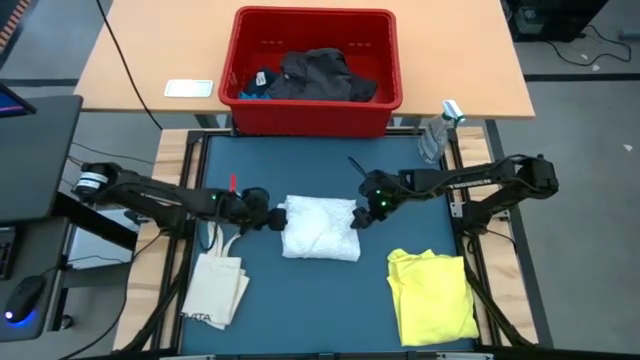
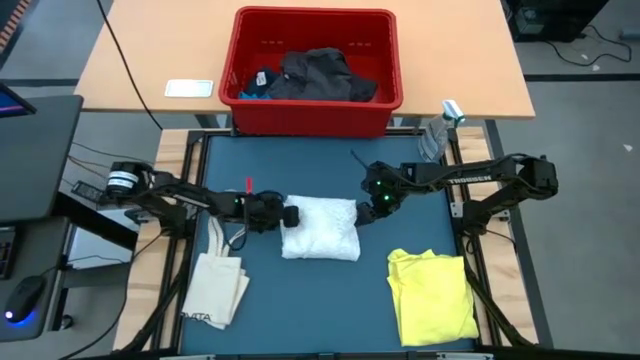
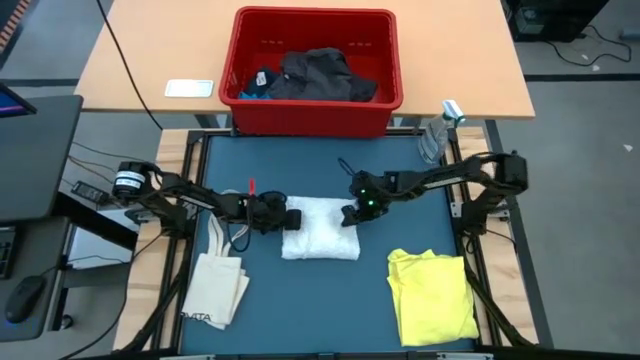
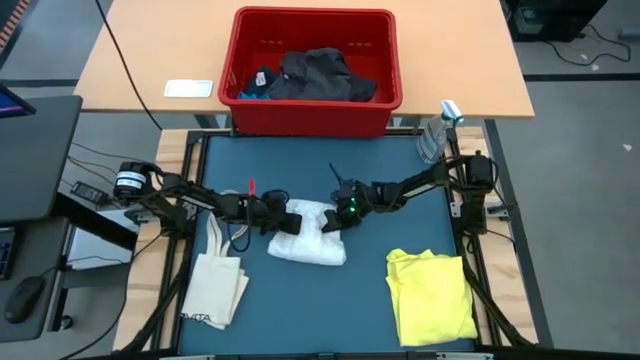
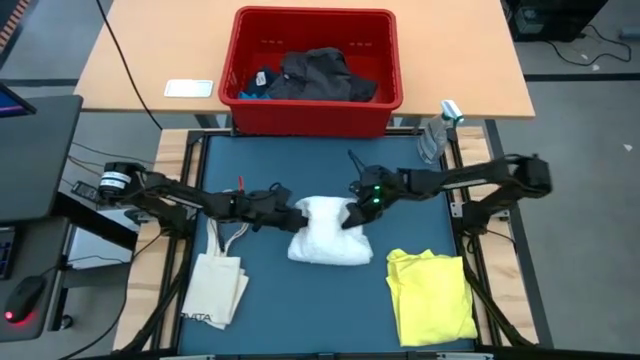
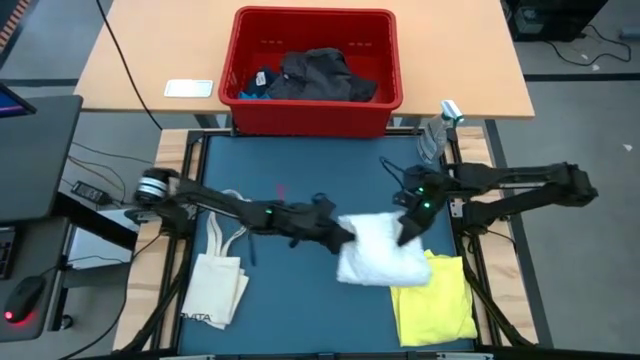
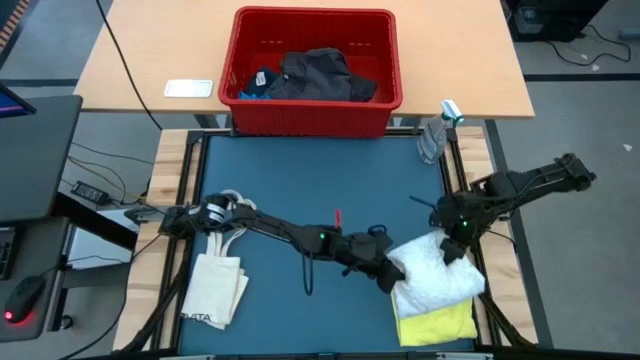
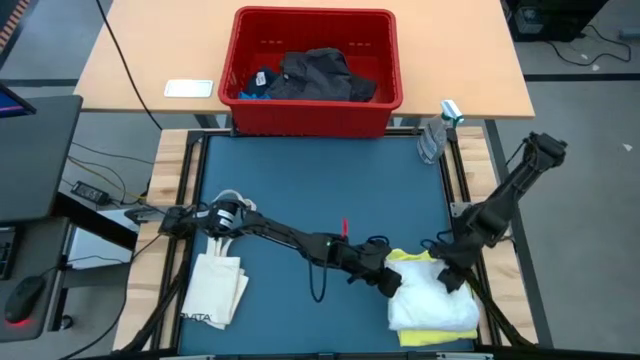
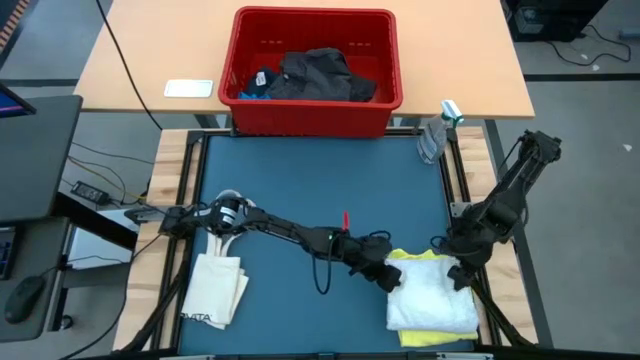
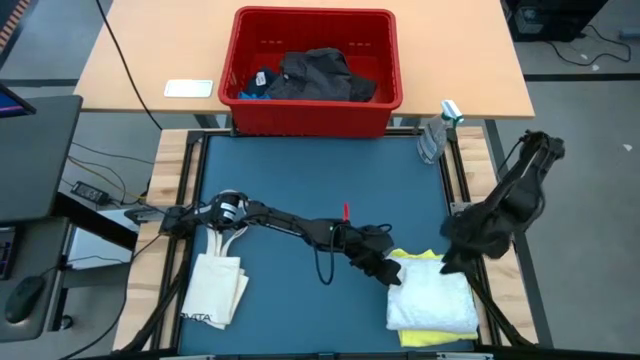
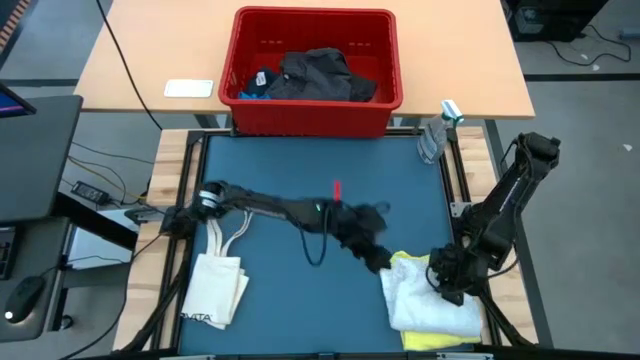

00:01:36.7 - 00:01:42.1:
Task: Fold laundry
Stack the white cloth on top of the yellow shirt

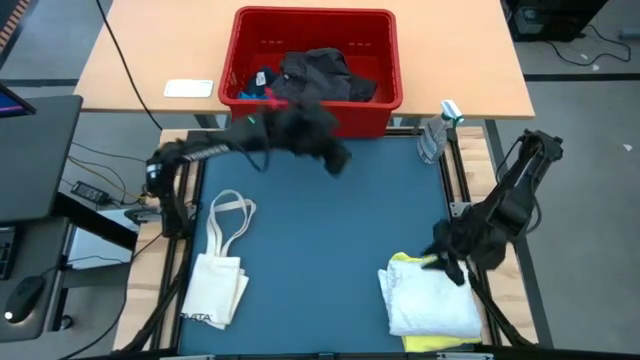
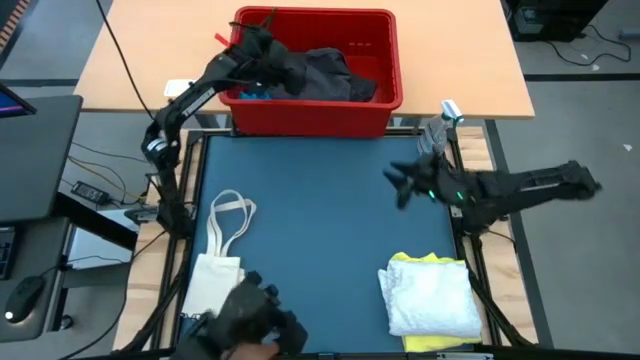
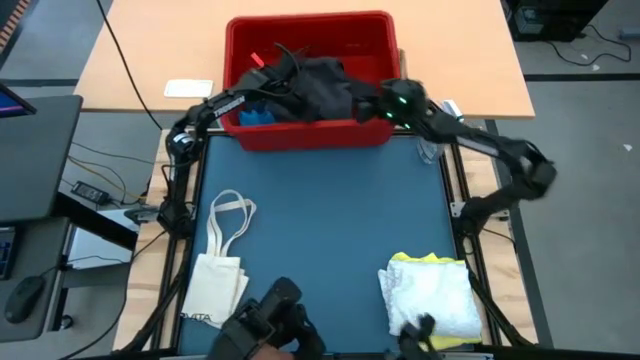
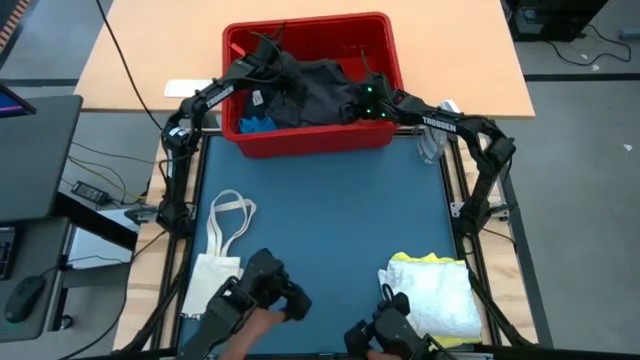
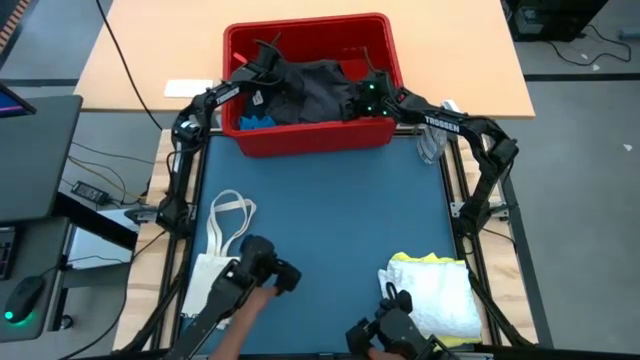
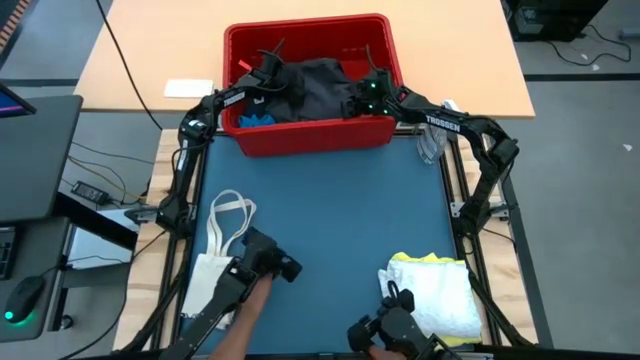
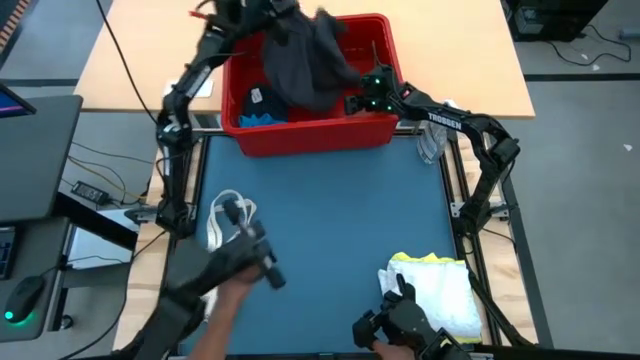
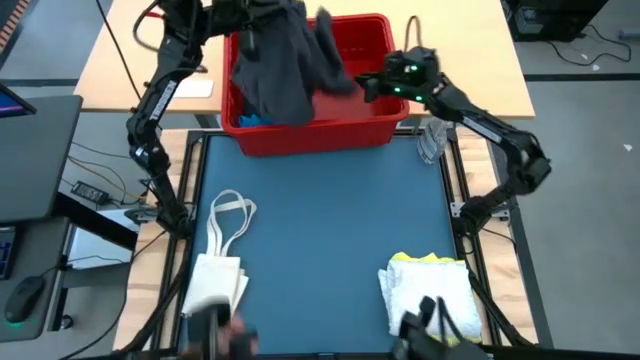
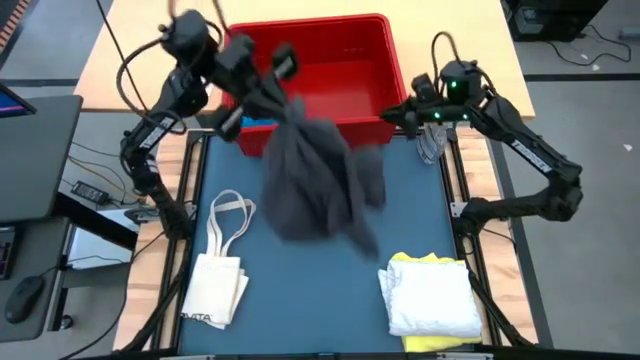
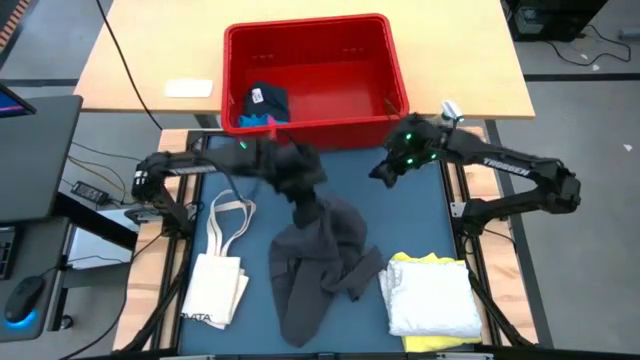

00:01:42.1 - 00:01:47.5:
Remove the gray boxer from the red bin

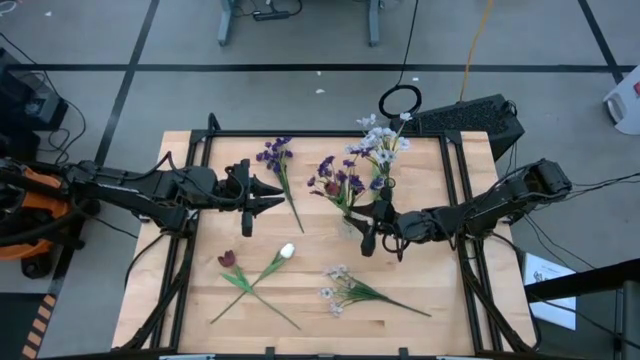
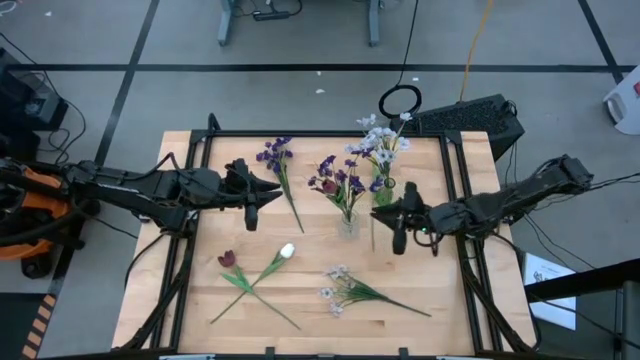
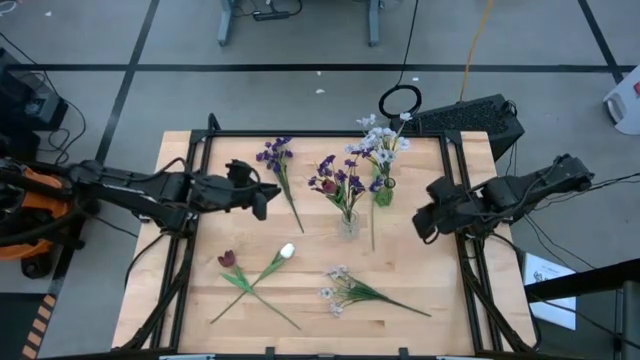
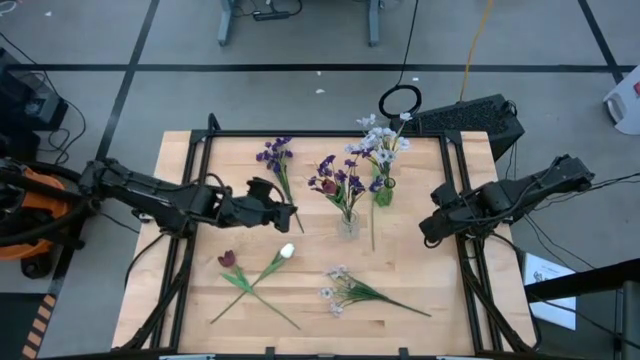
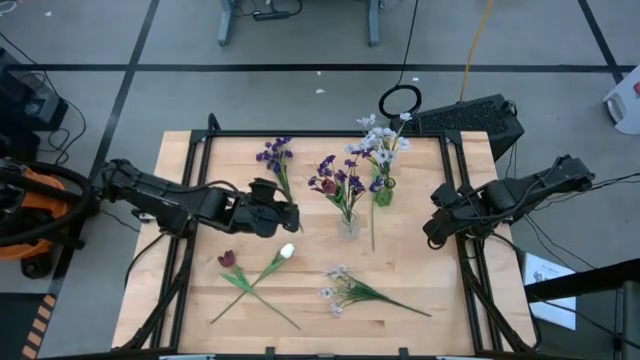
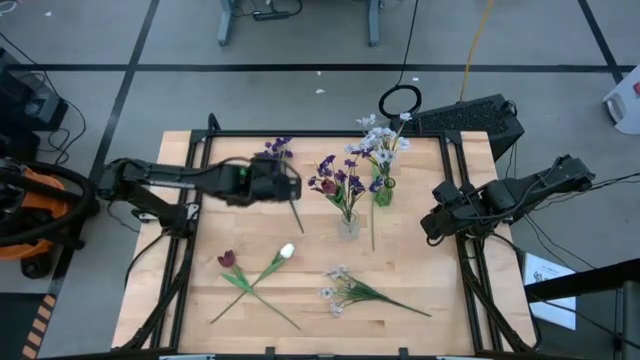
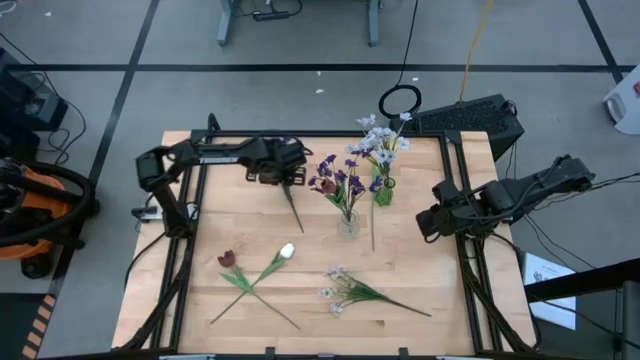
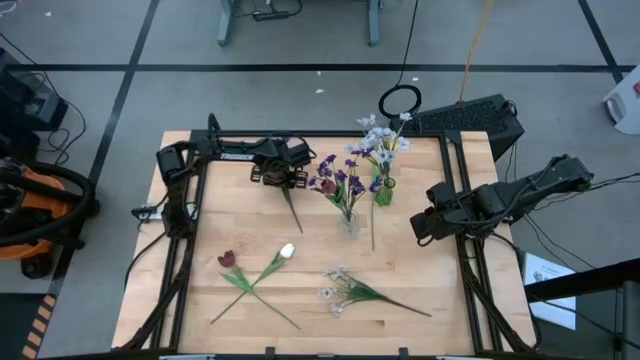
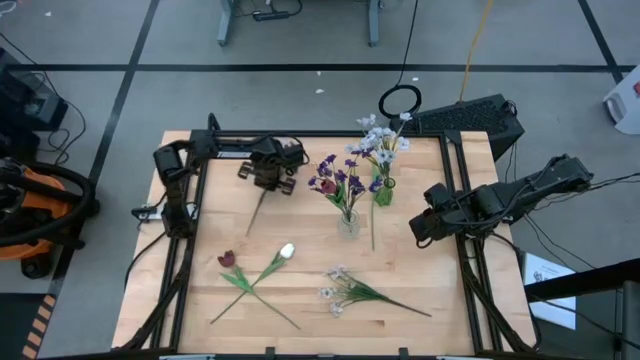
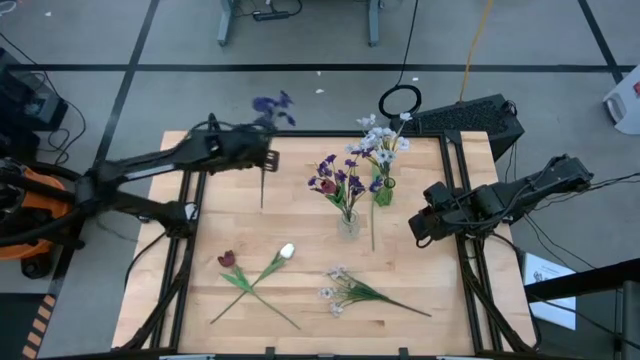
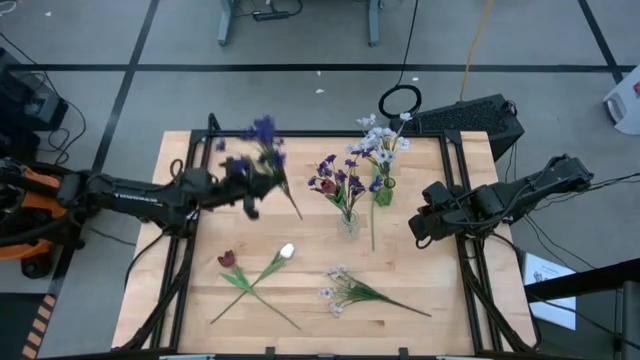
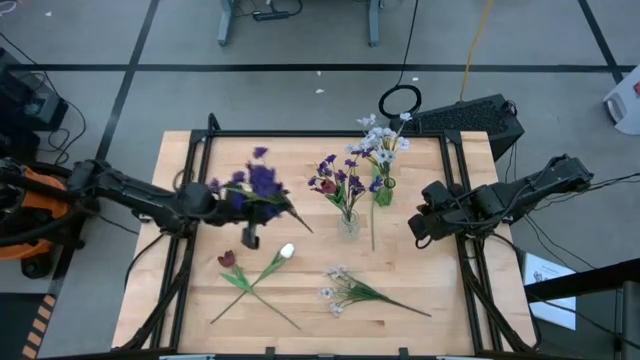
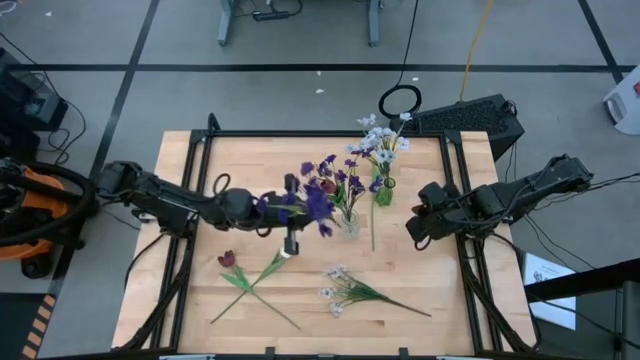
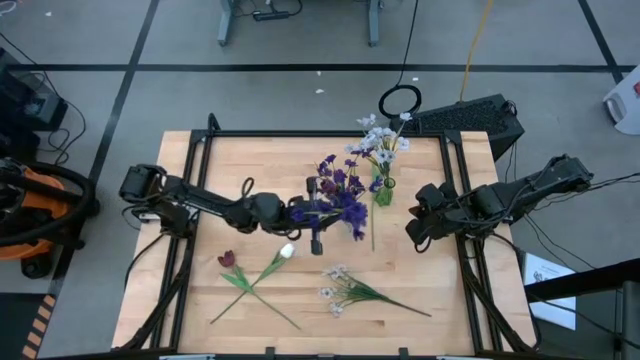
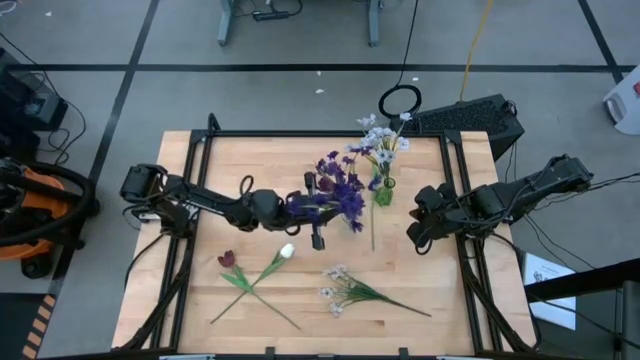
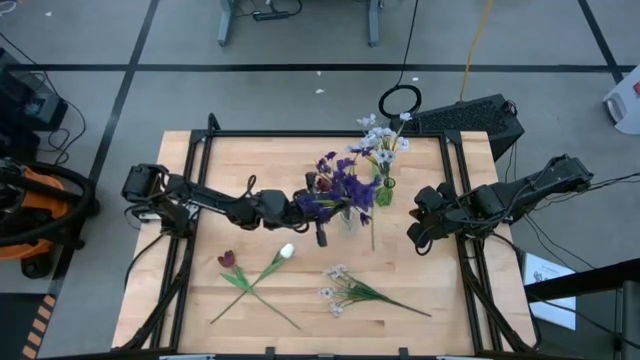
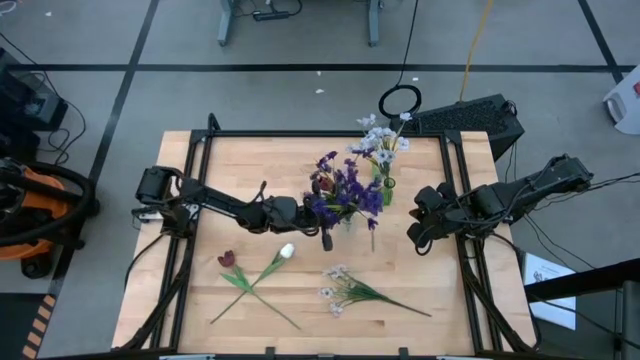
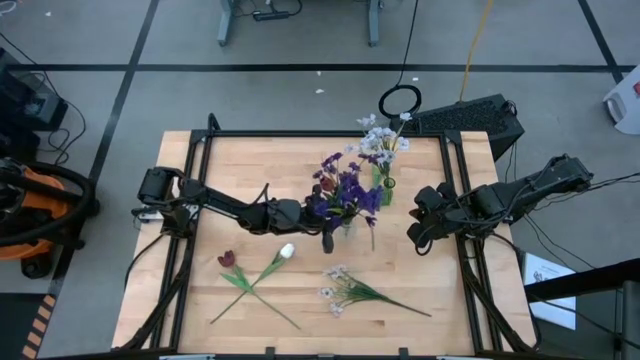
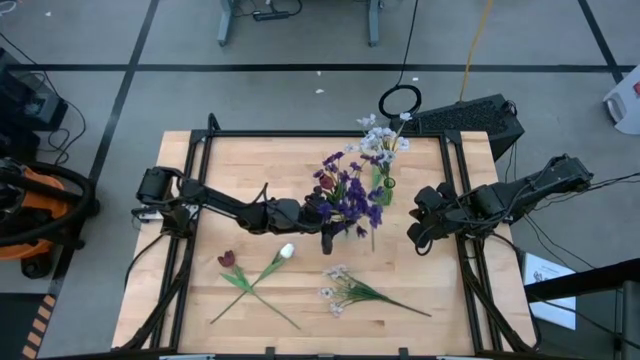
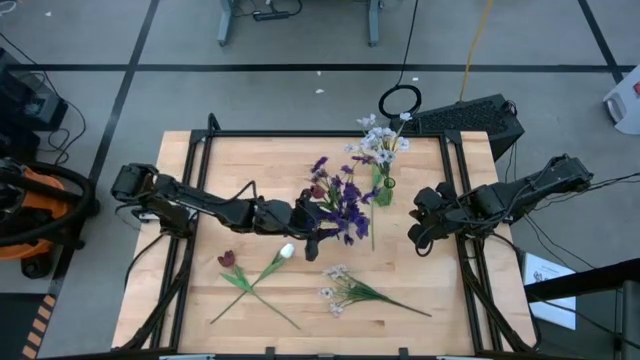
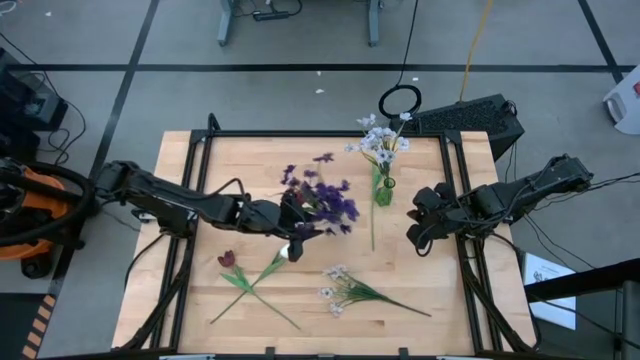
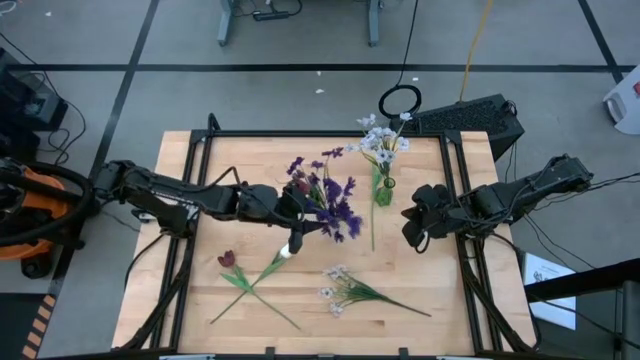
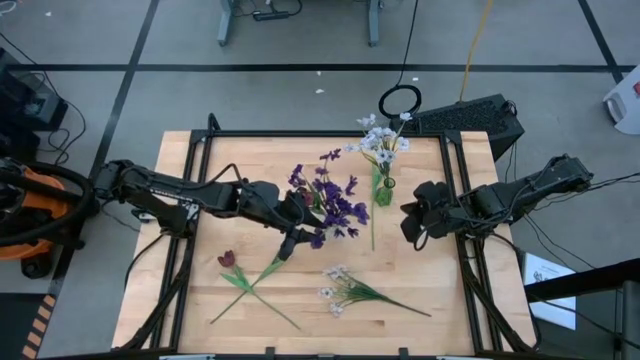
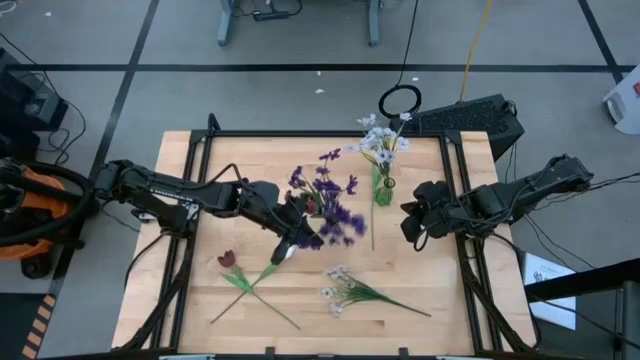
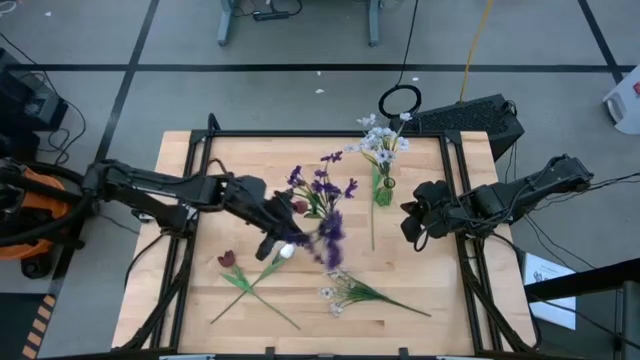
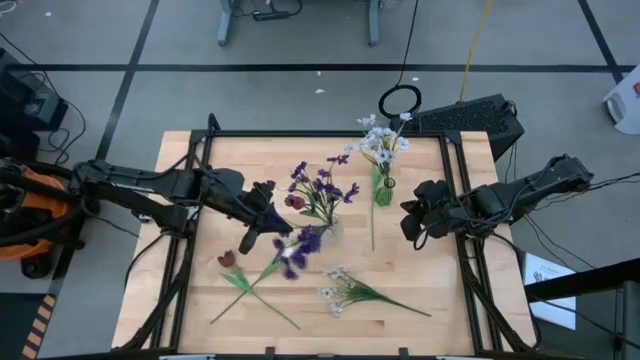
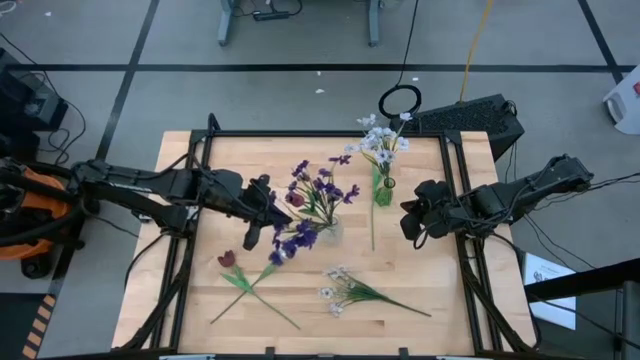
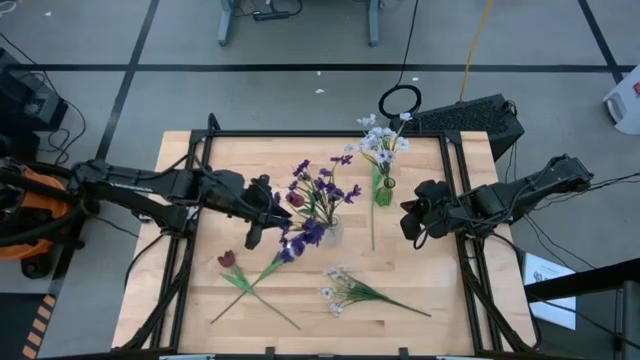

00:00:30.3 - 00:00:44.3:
Task: Sort flowers into vase by color
Put the purple flowers into the transparent vase
